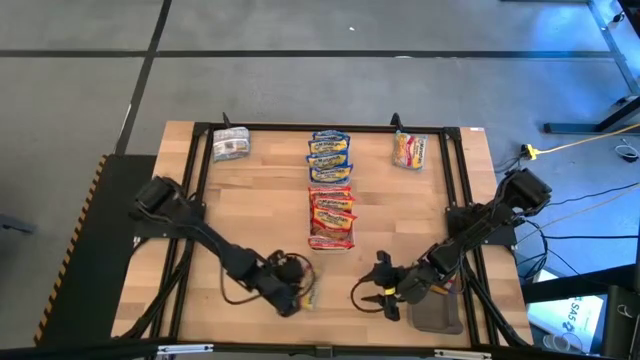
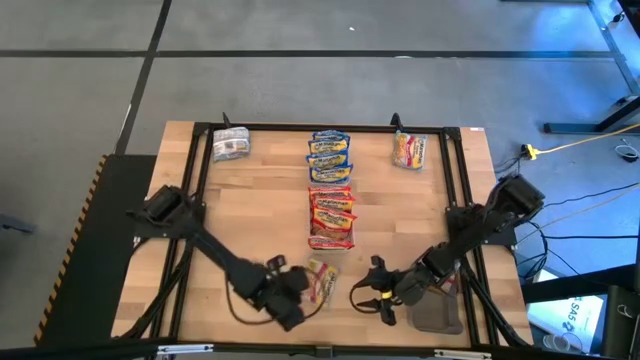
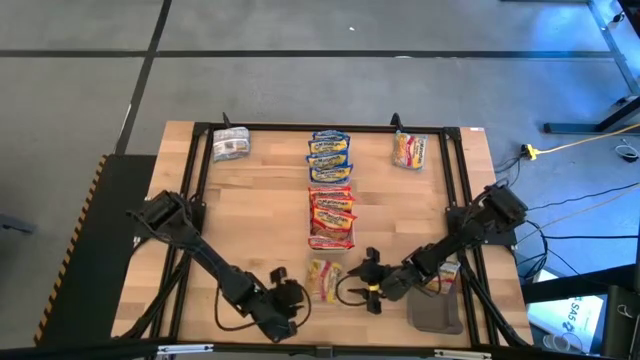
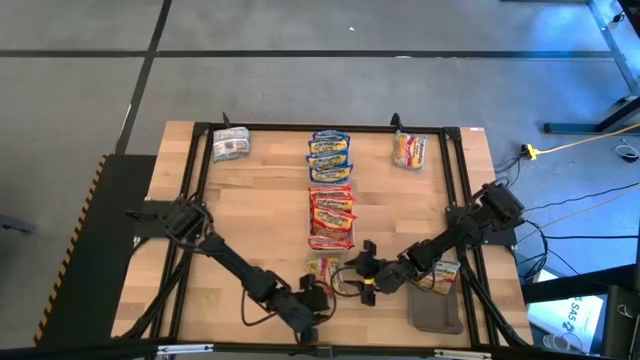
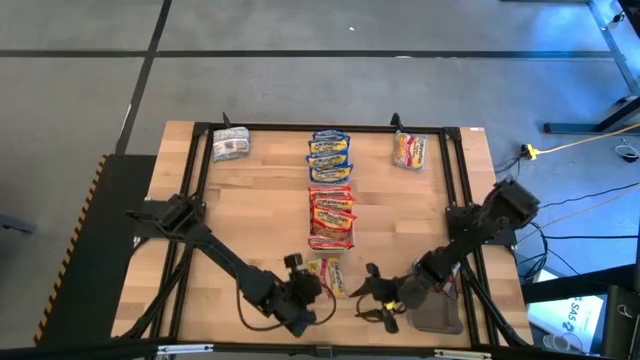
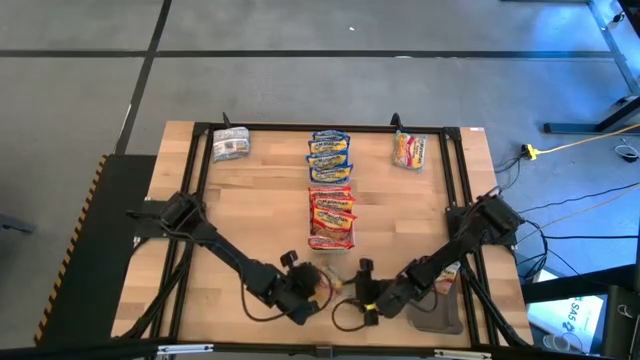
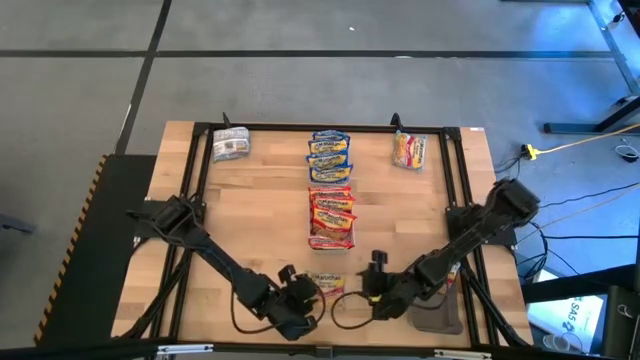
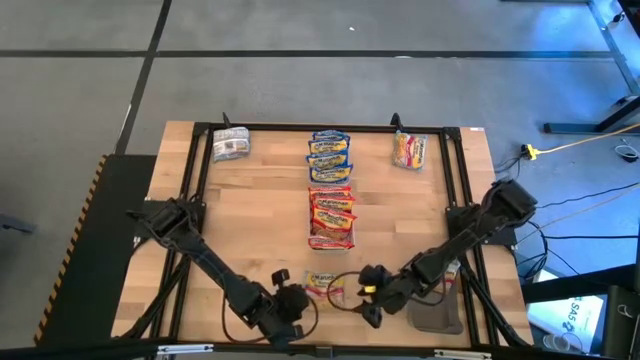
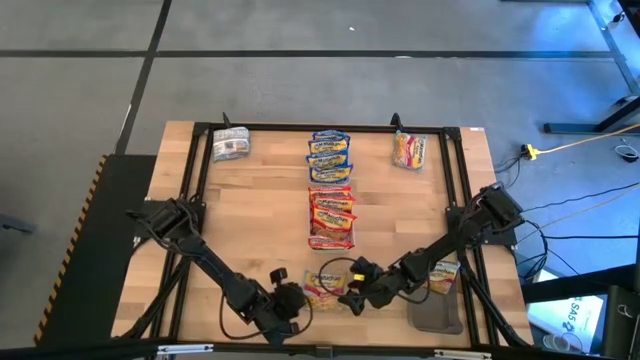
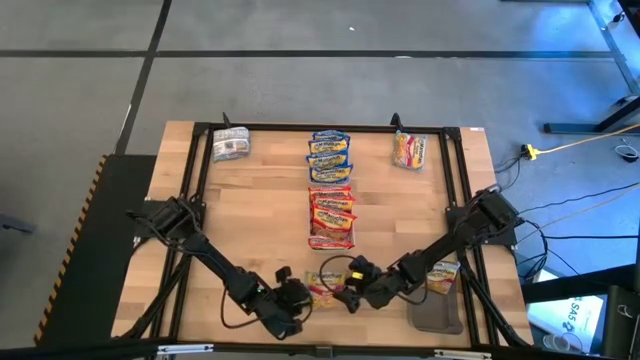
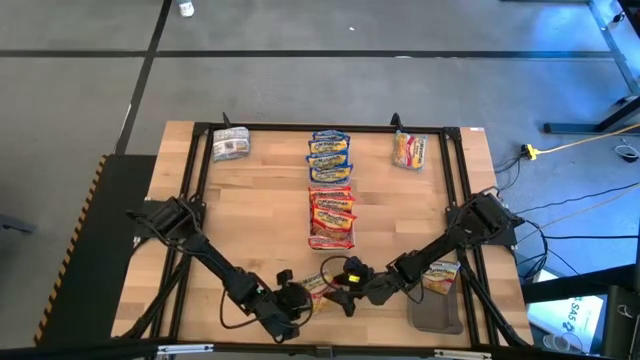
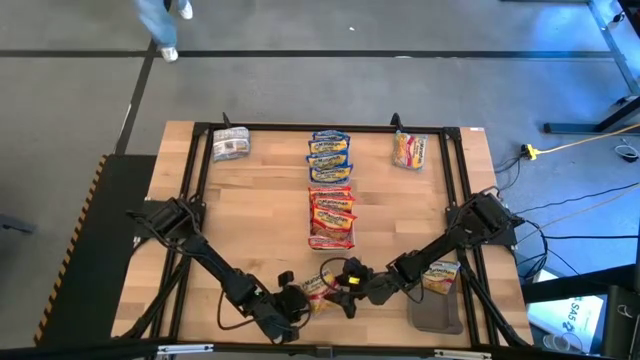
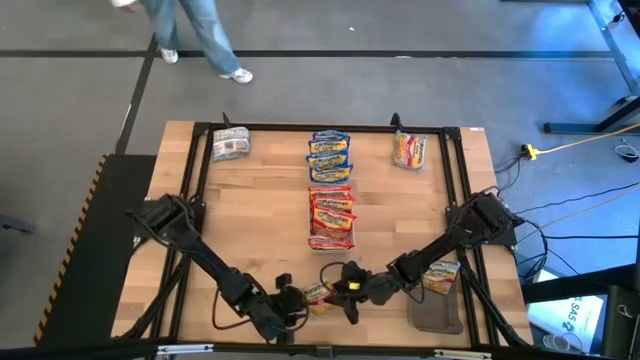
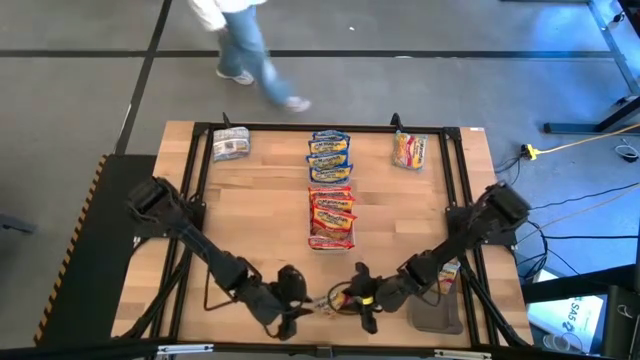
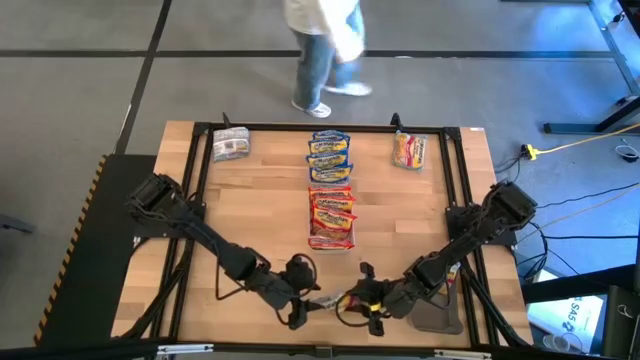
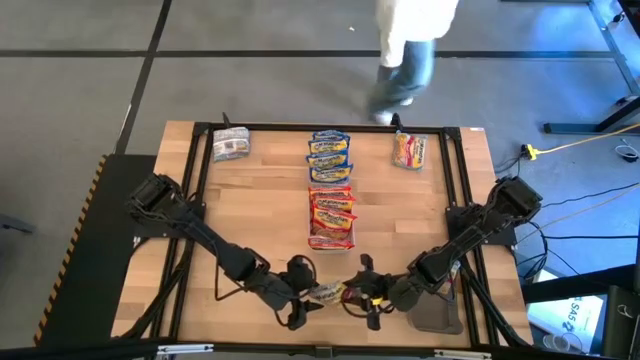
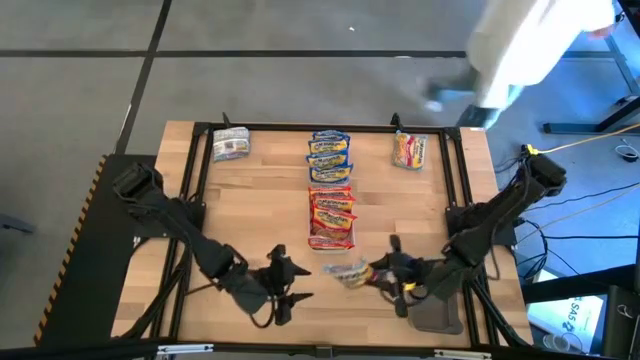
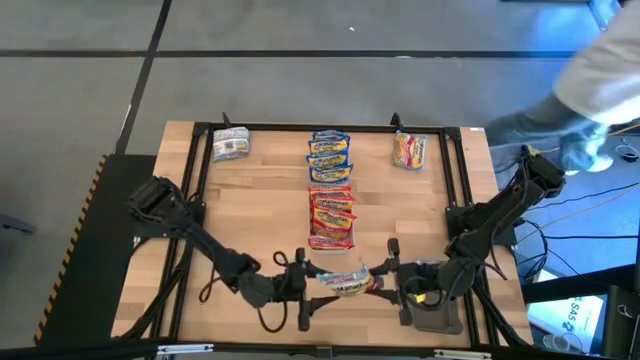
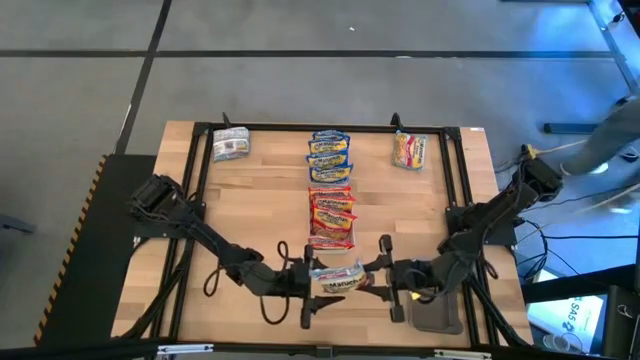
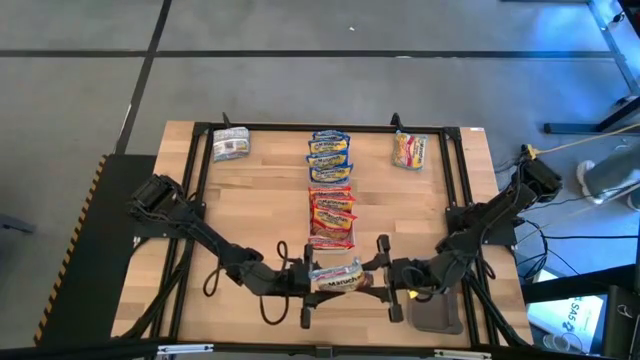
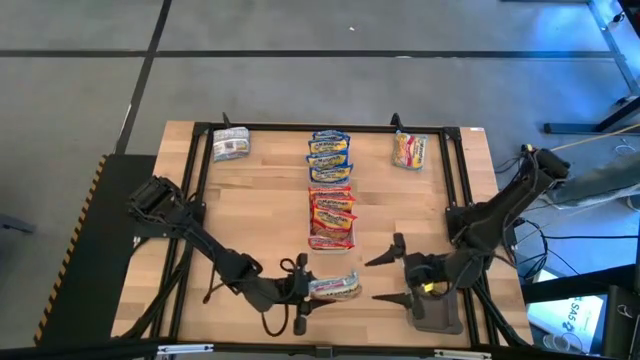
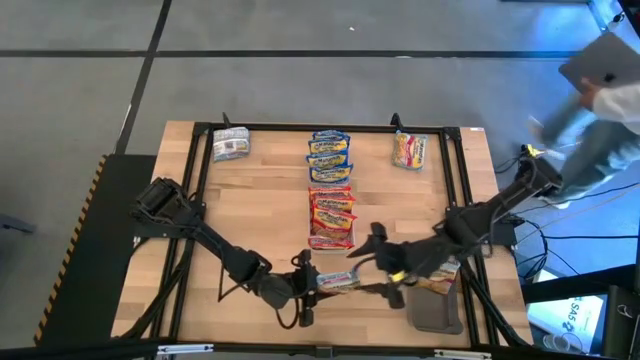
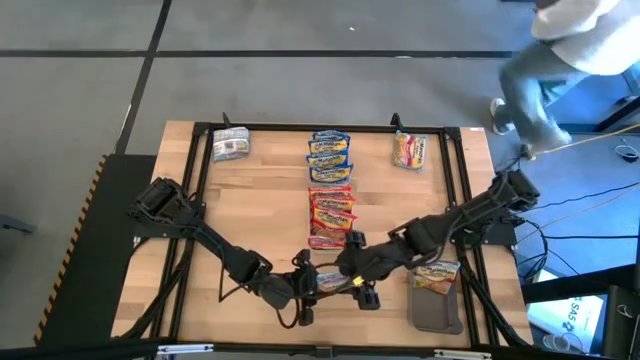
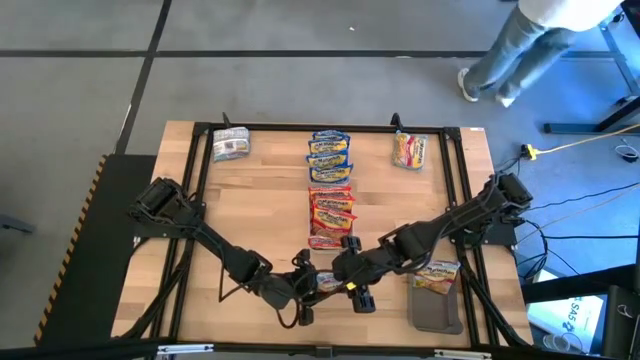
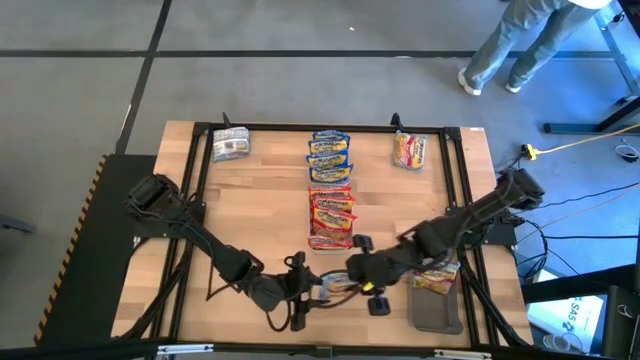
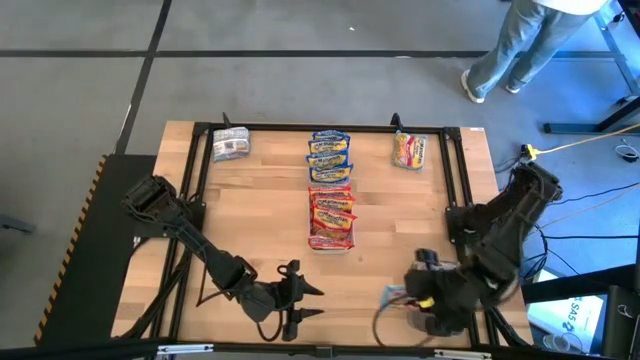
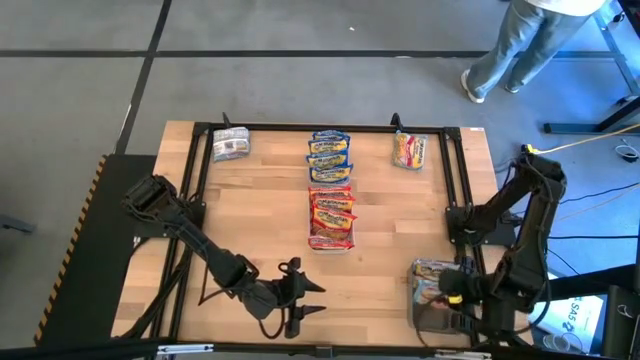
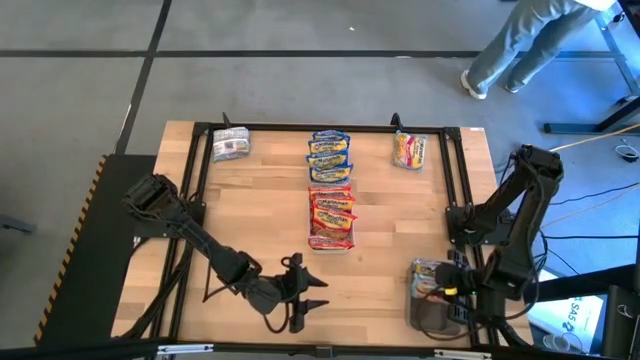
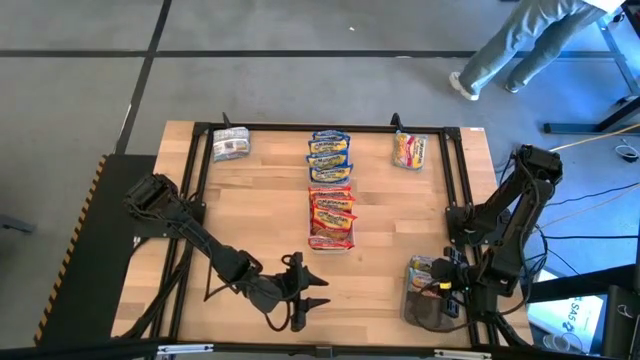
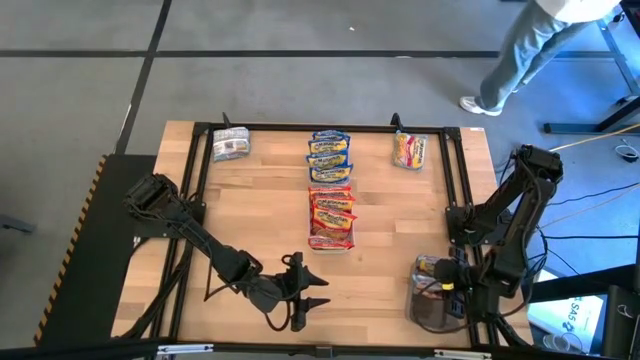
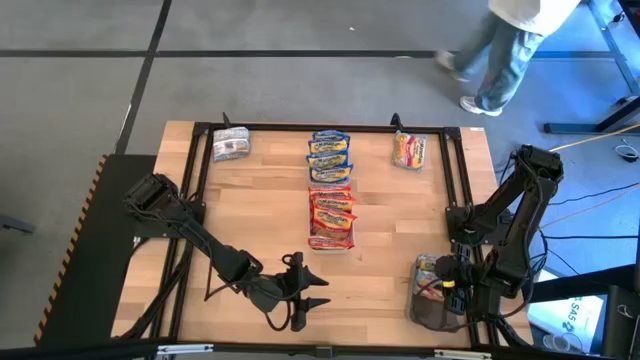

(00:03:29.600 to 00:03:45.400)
Task: Sort Maruchan noodles
Put the light blue noodle pack into the black bin

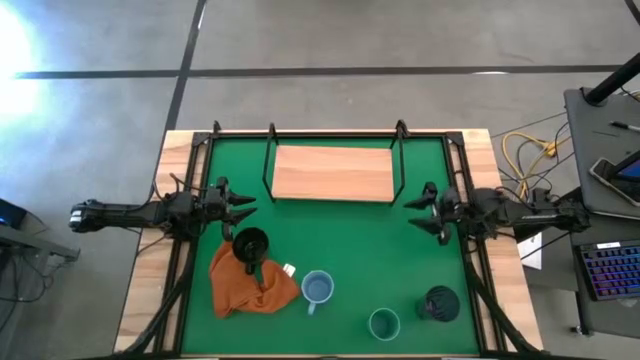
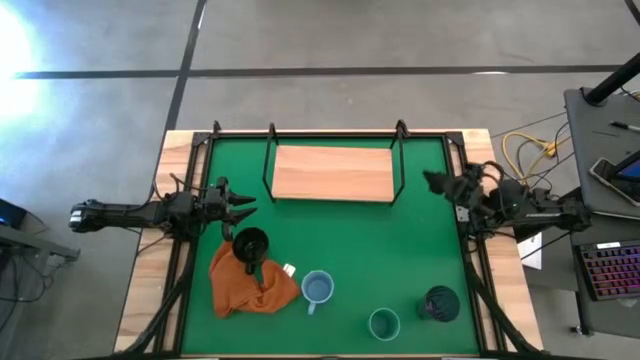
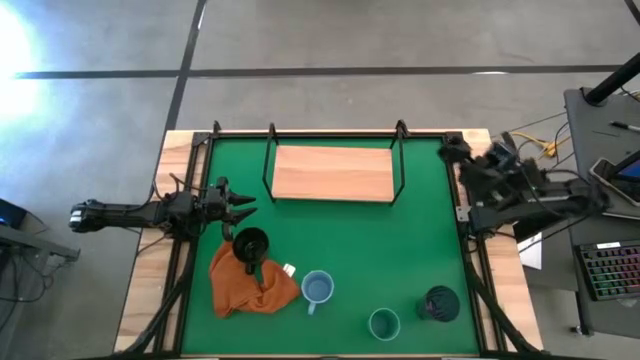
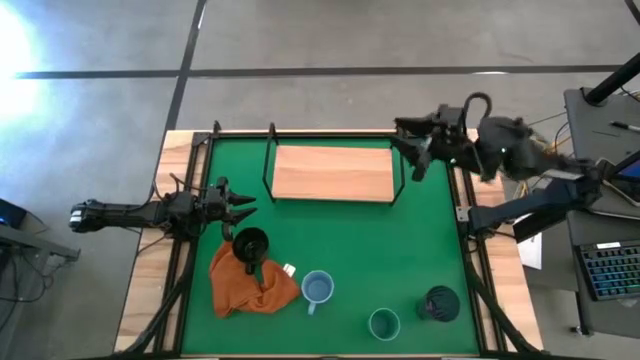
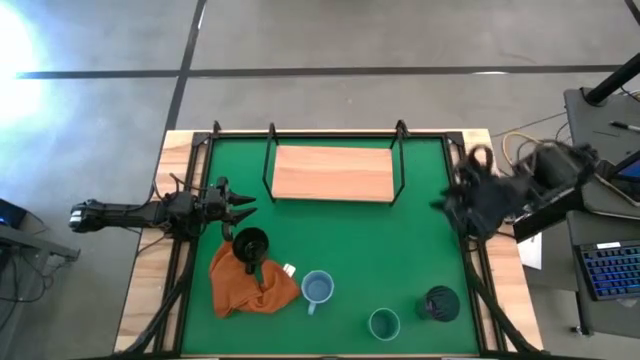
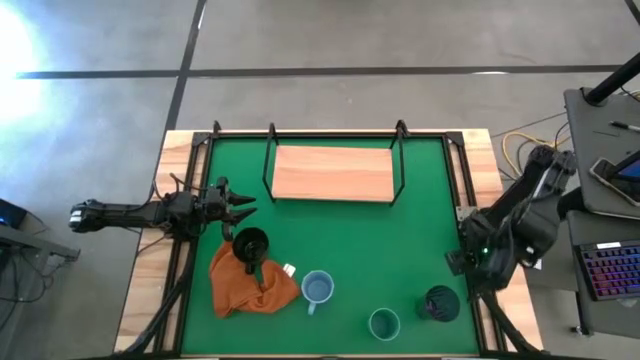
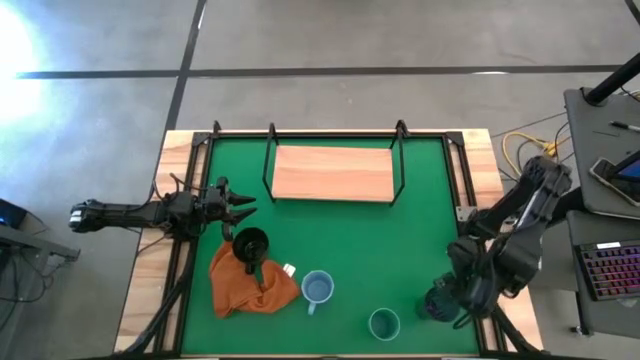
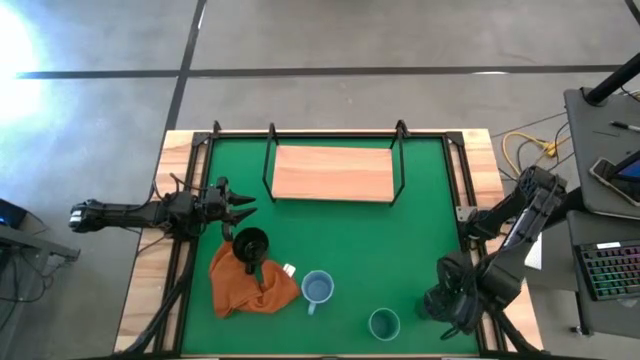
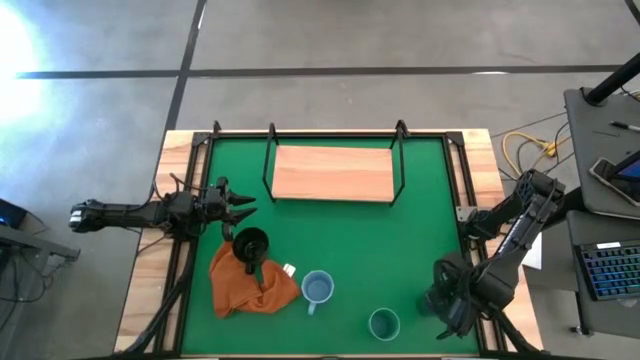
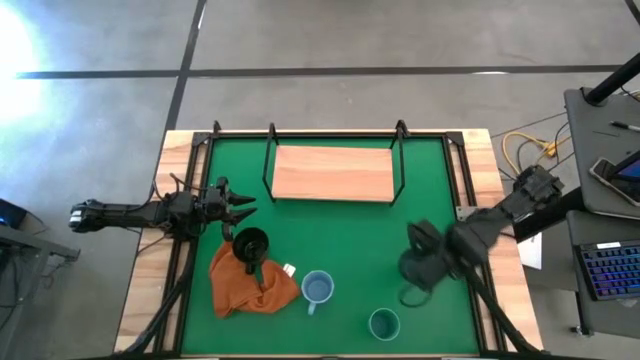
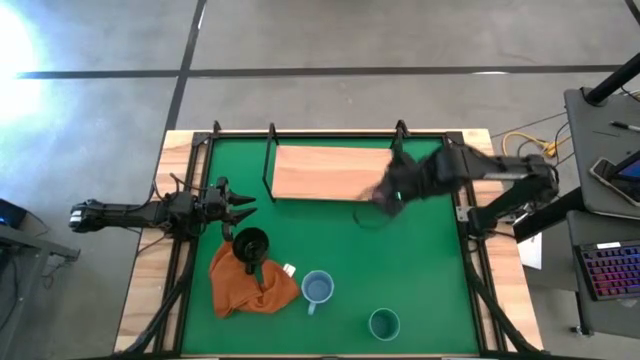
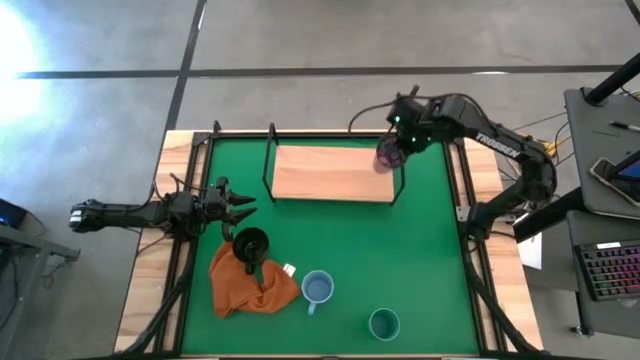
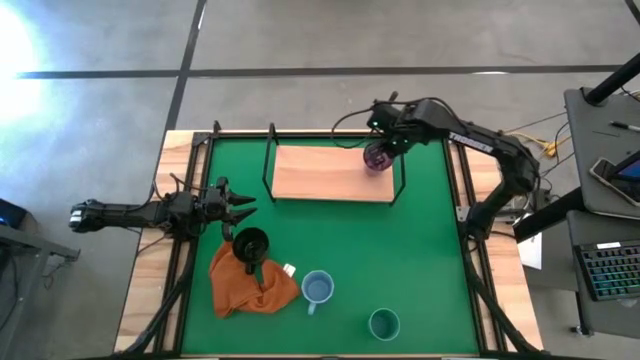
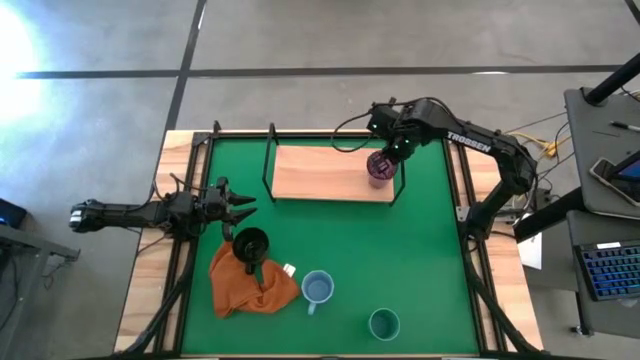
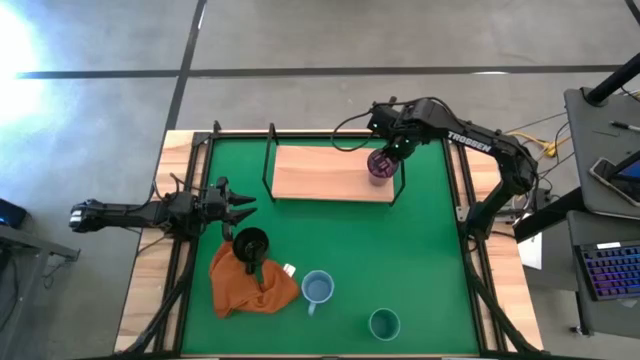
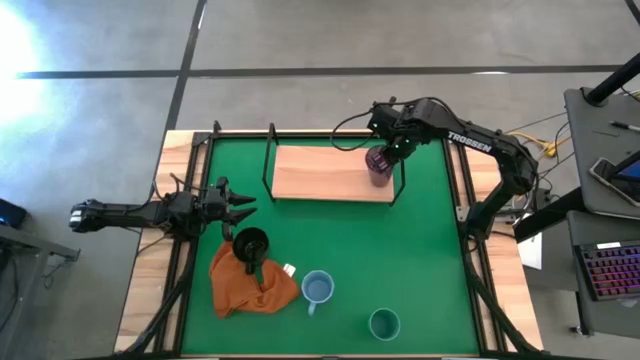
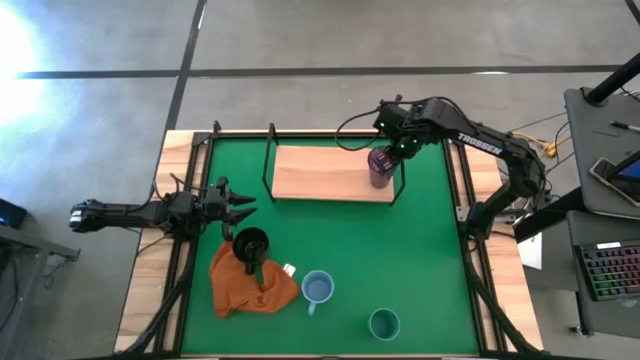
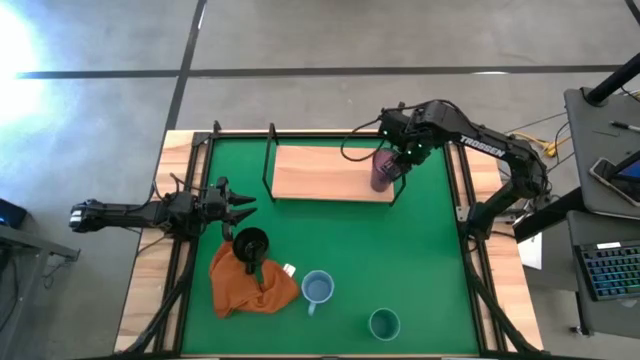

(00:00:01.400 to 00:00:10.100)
Task: Stack small to large cups/mugs on shelf
Put the violet cup on the shelf
